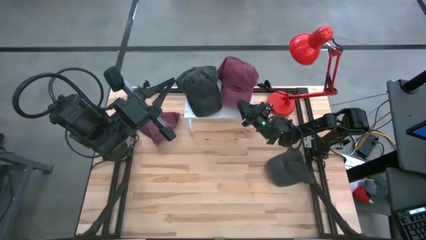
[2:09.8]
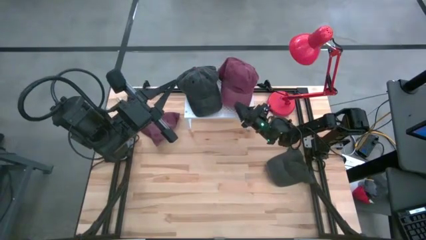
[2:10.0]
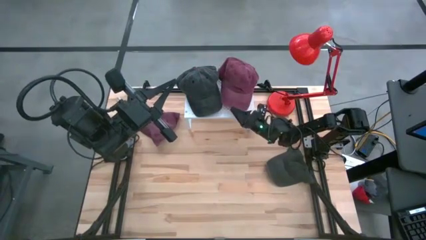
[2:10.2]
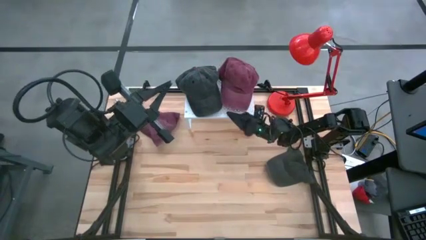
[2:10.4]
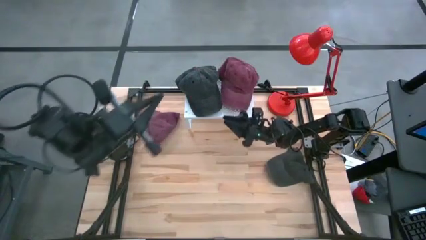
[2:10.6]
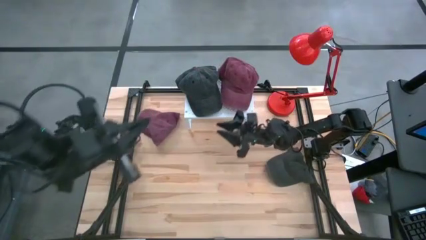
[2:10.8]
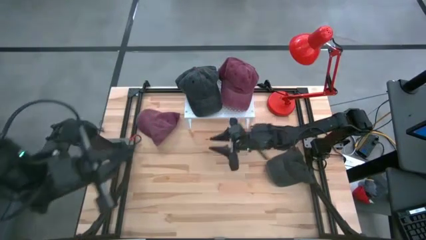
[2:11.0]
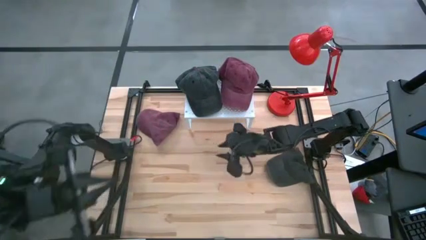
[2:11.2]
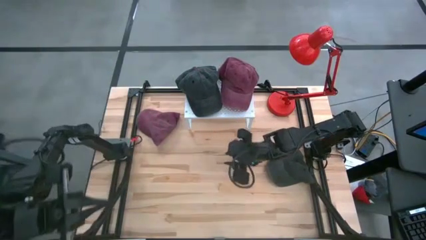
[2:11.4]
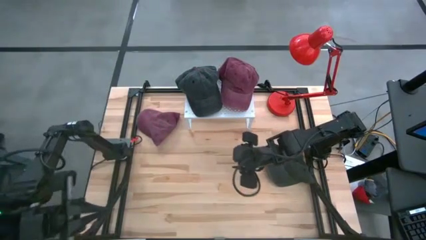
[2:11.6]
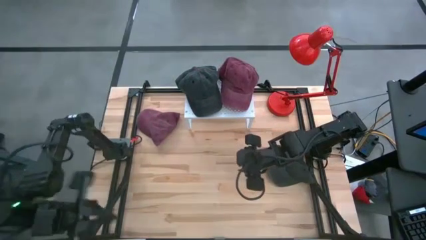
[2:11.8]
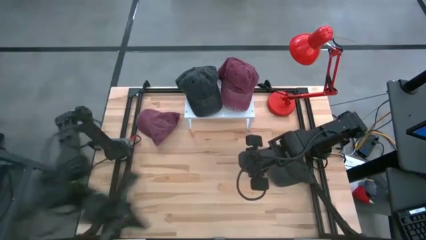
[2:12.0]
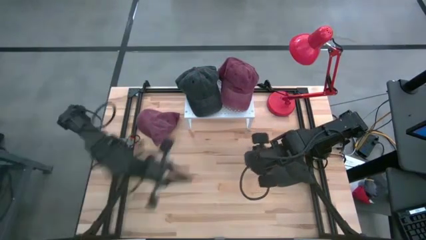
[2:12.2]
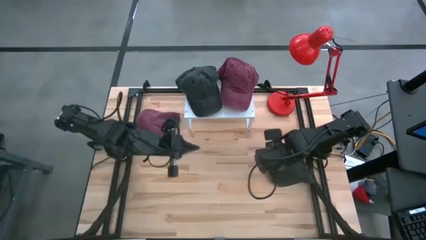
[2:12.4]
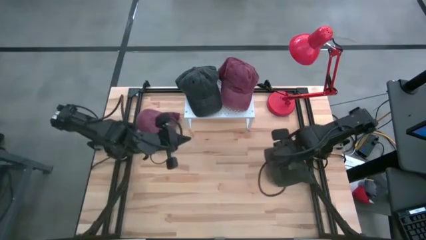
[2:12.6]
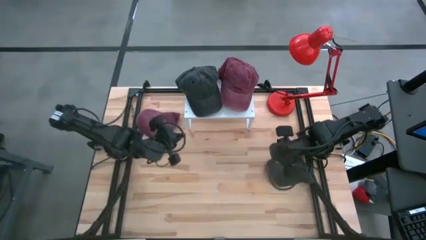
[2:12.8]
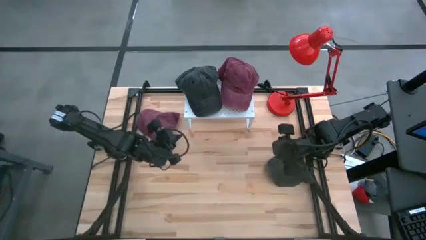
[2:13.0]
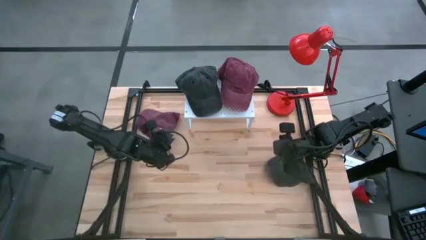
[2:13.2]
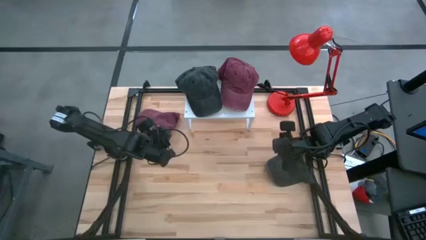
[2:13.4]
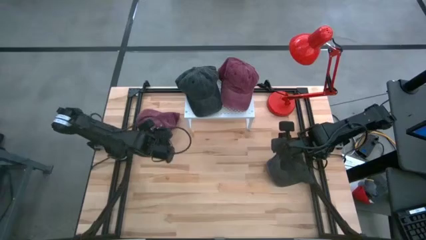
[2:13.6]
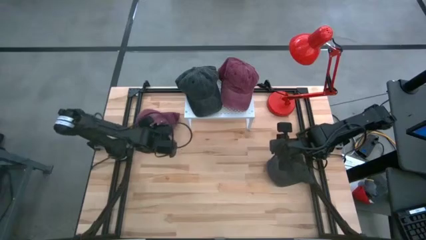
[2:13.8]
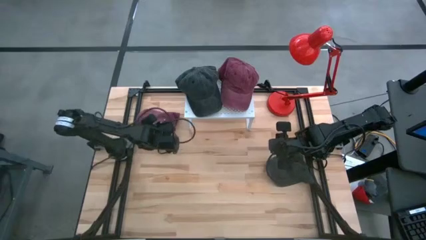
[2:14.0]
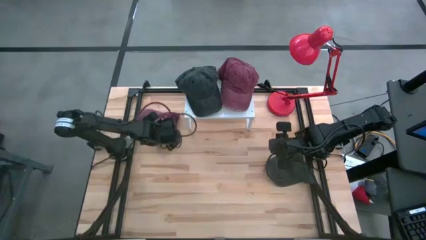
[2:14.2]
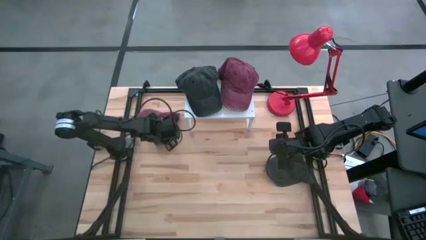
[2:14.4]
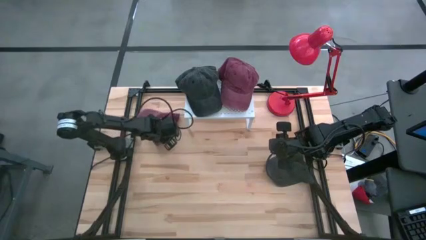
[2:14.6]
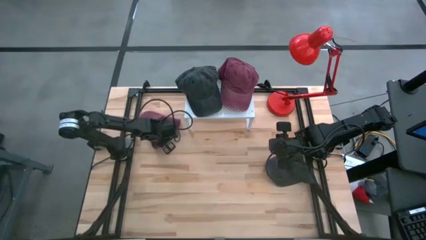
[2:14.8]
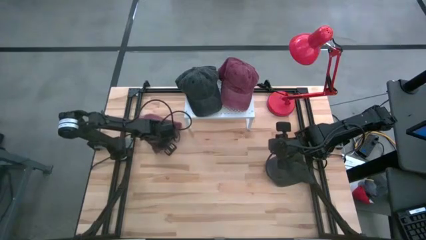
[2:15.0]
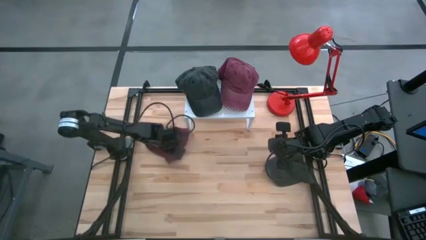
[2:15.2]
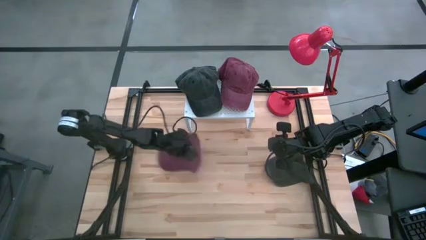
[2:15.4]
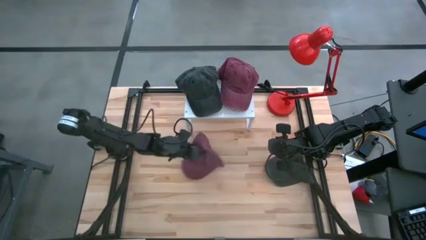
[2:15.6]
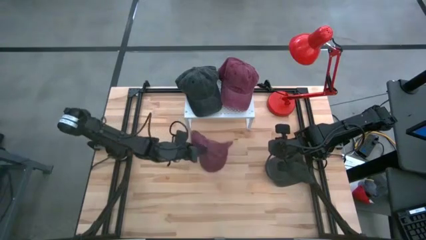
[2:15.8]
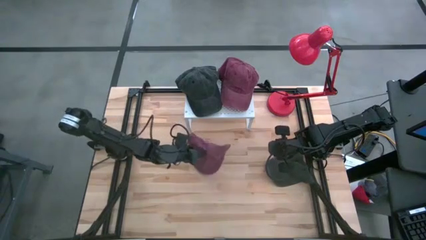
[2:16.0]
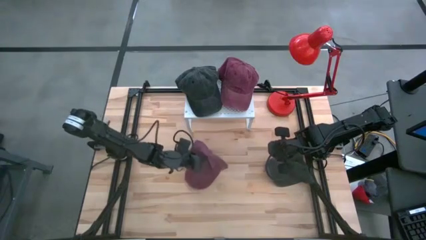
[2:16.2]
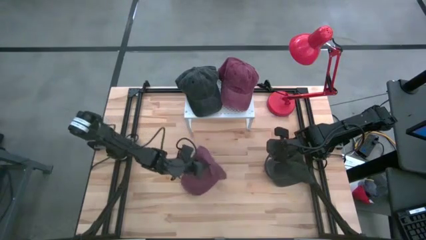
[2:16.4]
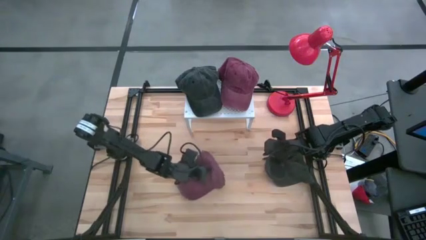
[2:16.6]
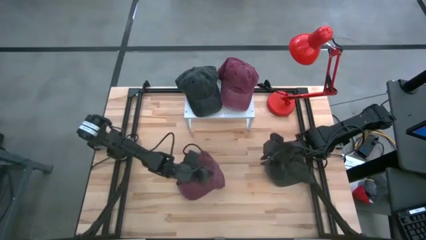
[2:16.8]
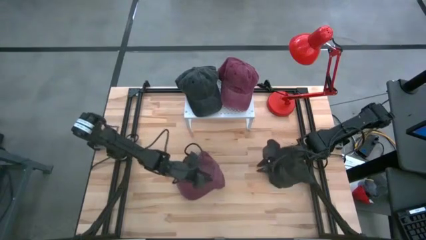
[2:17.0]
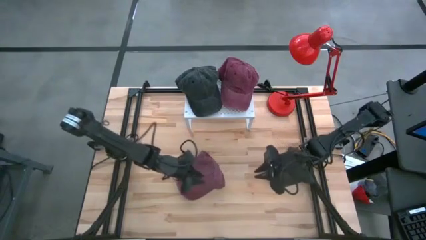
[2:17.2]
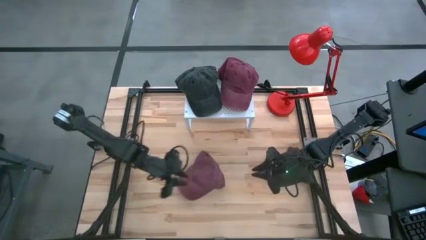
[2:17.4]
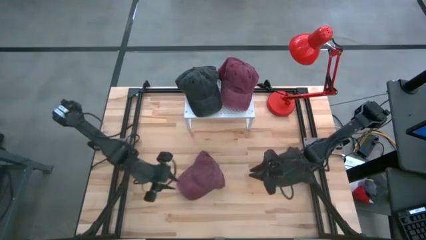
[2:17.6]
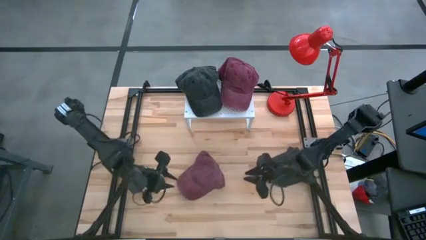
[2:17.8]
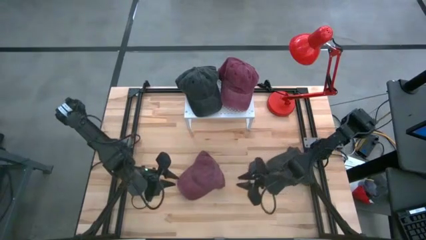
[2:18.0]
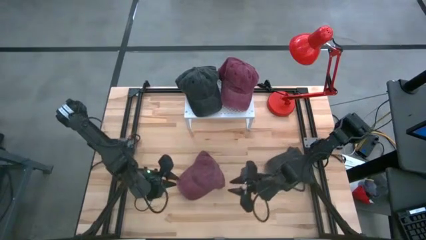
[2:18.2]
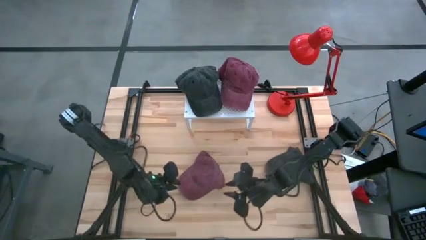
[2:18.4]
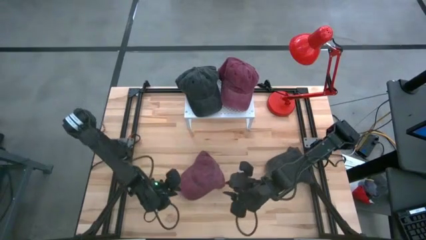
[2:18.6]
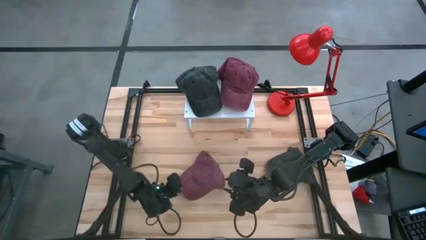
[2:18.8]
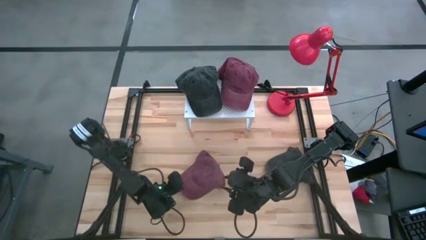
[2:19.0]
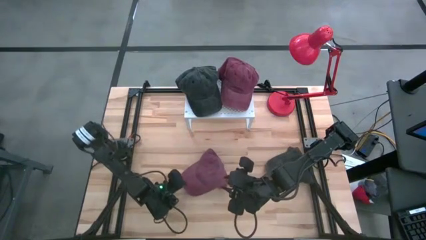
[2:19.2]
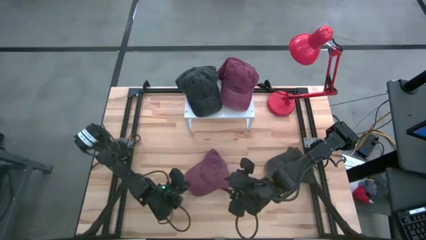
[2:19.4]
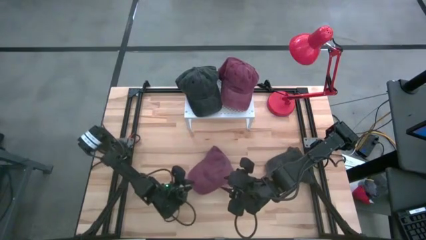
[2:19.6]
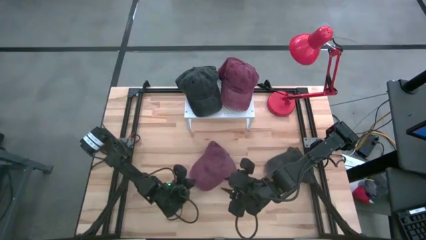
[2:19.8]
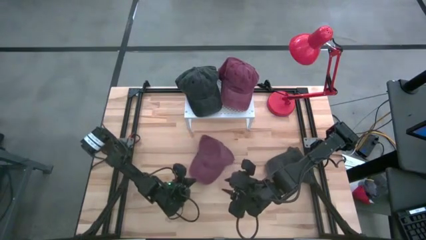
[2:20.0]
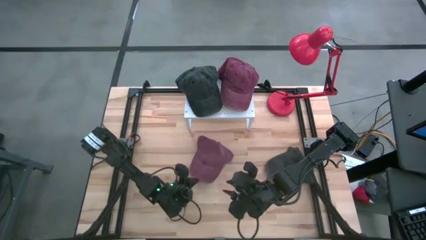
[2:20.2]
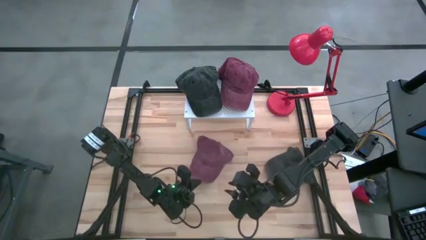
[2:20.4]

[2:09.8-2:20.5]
Task: Pick & Place hat
Stack the red cap on top of the red cap on the shelf

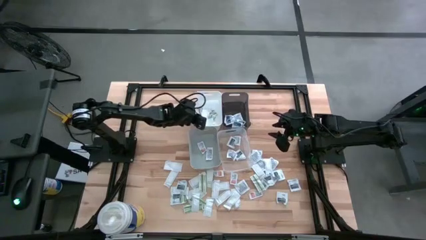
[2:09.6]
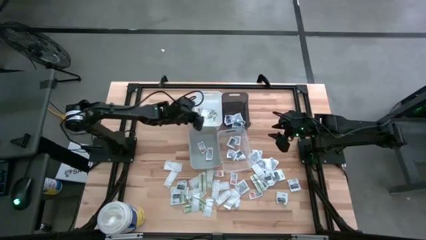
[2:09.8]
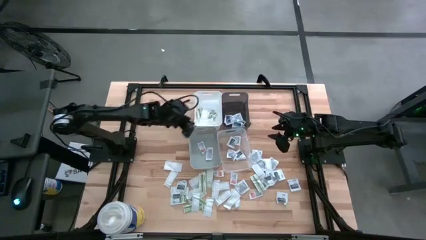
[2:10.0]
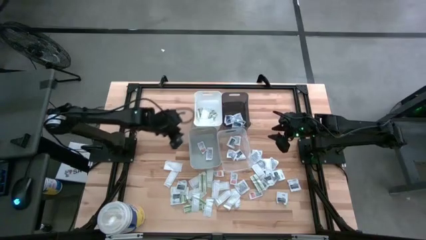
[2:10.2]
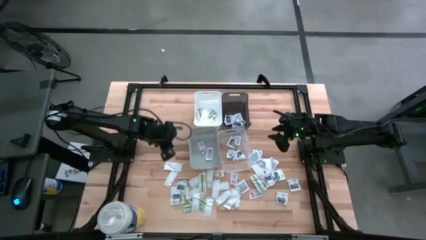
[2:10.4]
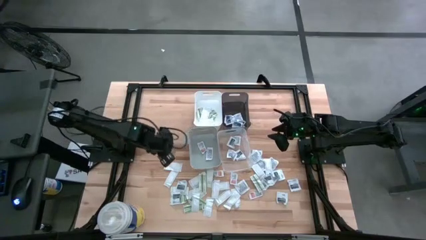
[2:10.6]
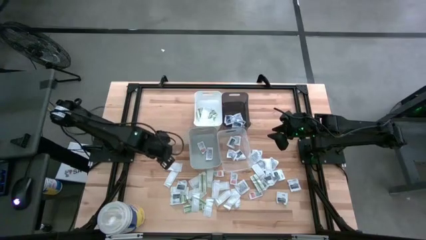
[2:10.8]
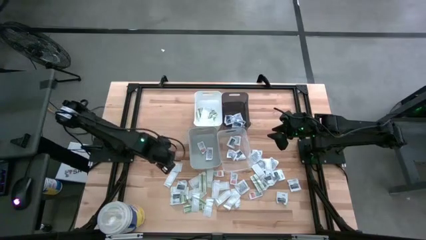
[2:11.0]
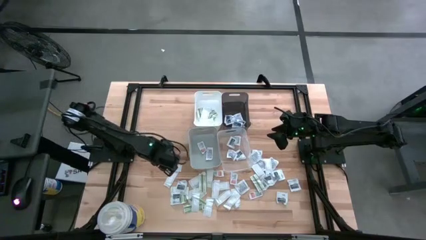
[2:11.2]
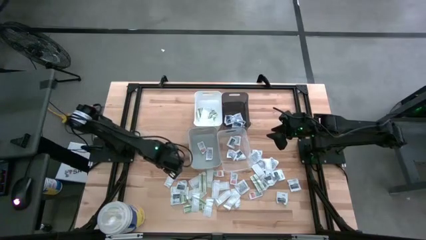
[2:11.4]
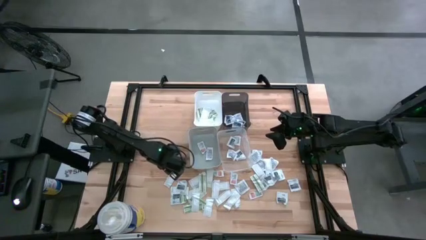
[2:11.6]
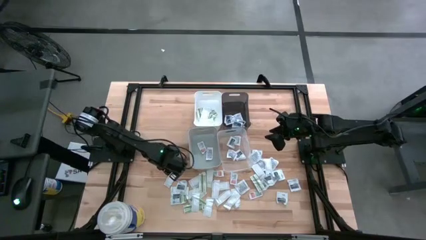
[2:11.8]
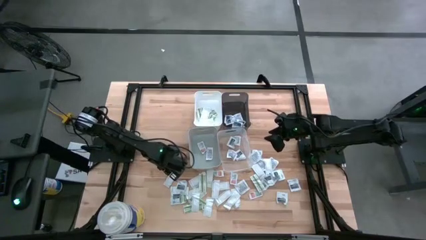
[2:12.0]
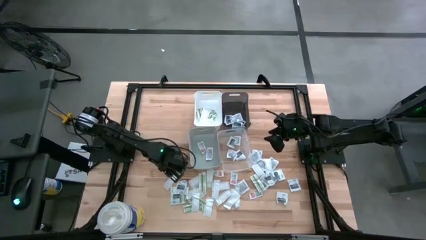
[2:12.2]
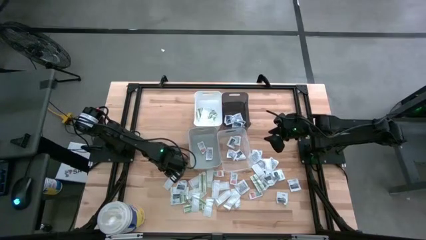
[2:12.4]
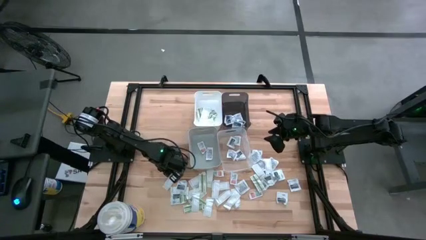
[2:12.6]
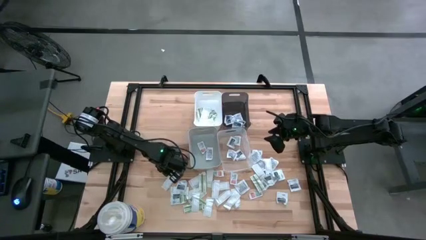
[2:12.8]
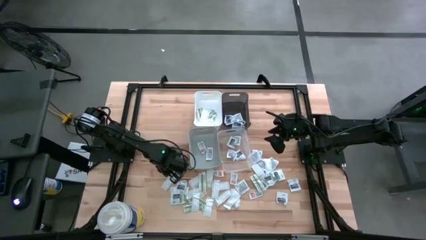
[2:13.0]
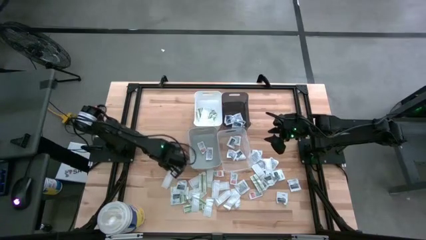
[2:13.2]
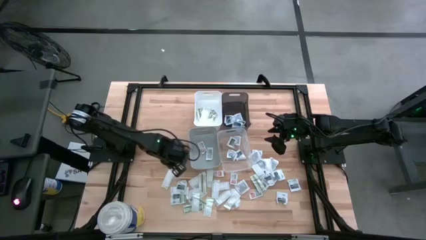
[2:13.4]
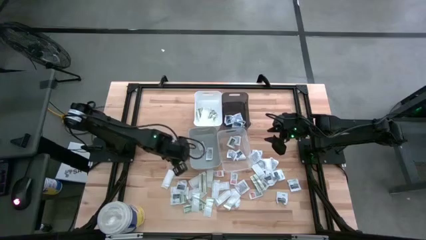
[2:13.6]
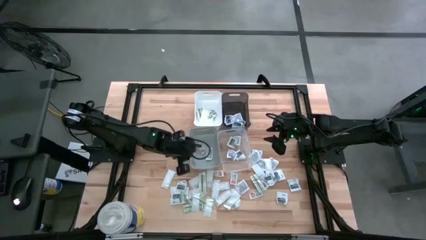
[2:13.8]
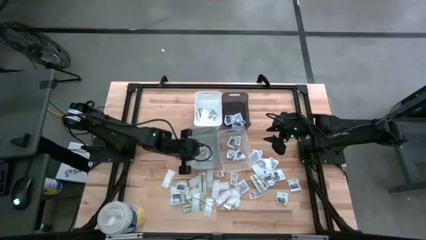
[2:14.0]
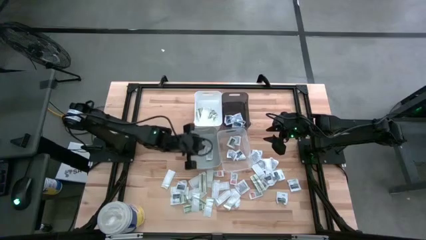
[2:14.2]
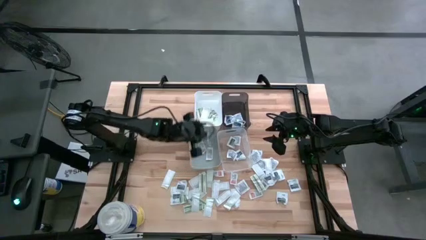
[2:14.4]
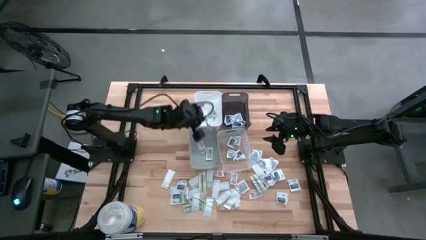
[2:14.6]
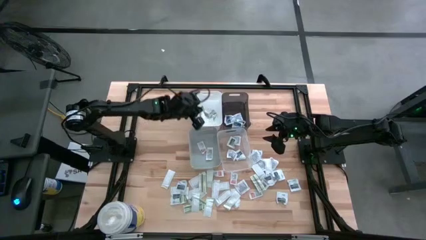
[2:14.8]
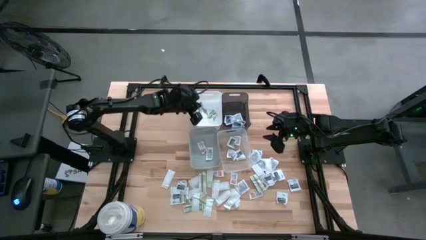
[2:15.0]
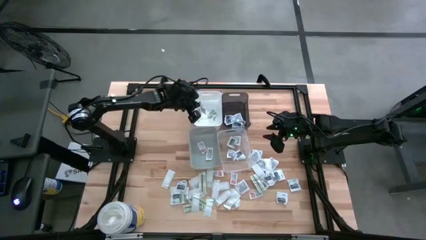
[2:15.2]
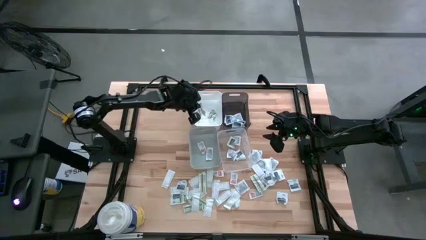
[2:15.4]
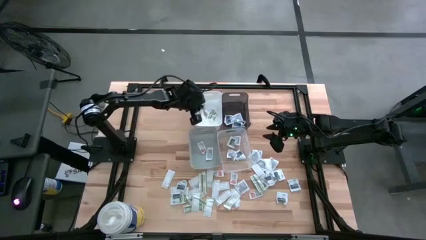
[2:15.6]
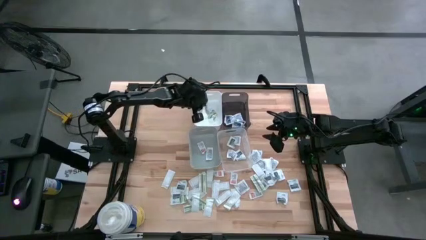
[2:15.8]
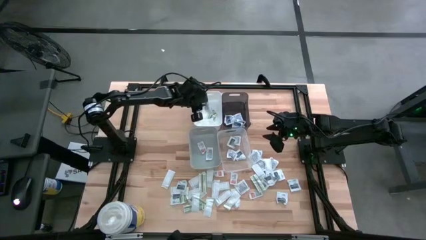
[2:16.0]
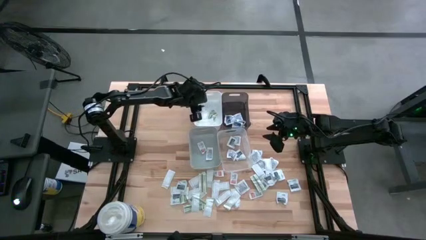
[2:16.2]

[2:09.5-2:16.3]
Task: Pick & Place First Aid Supplies
Put the green bandage pack into the white bin

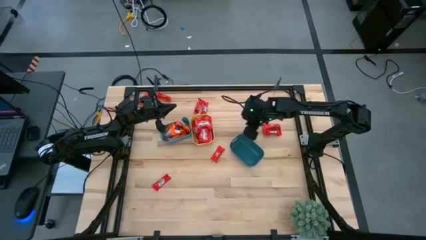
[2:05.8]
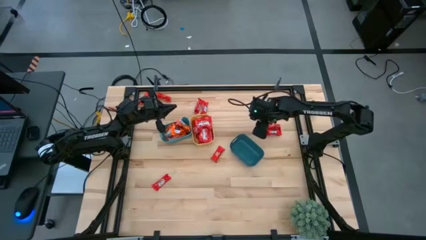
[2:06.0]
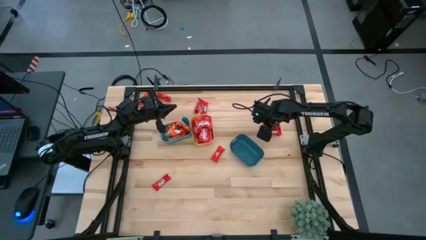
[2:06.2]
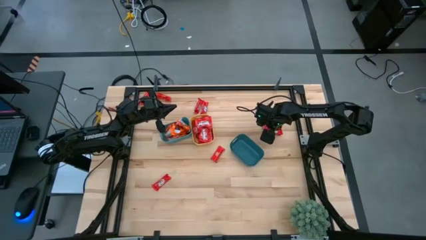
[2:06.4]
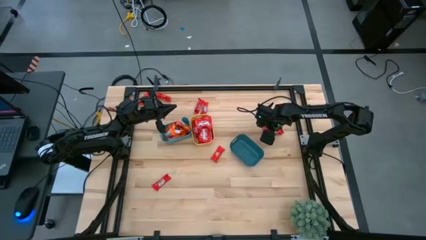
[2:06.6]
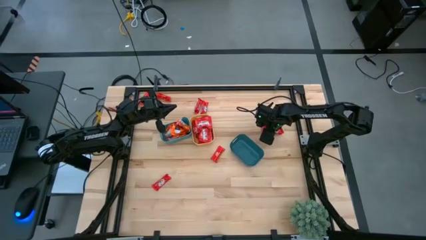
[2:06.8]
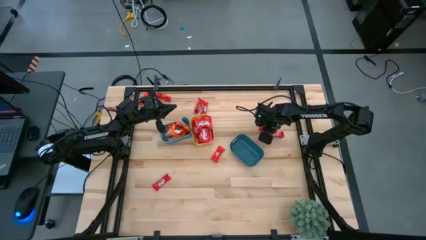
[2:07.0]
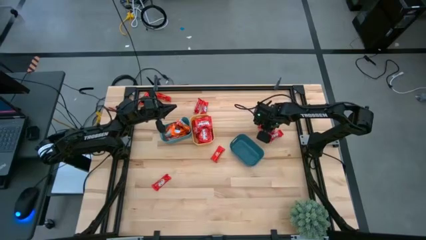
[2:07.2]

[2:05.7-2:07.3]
Task: Sort candy
Put the dark red candy into the blue bin
